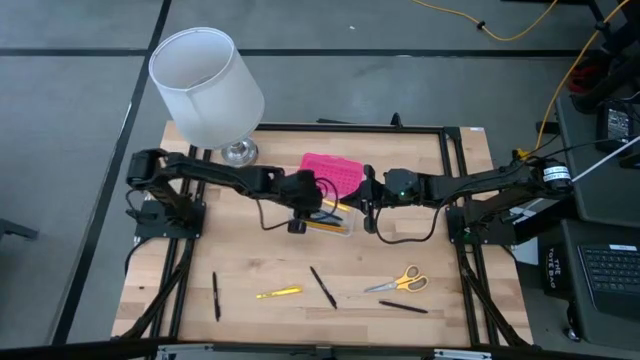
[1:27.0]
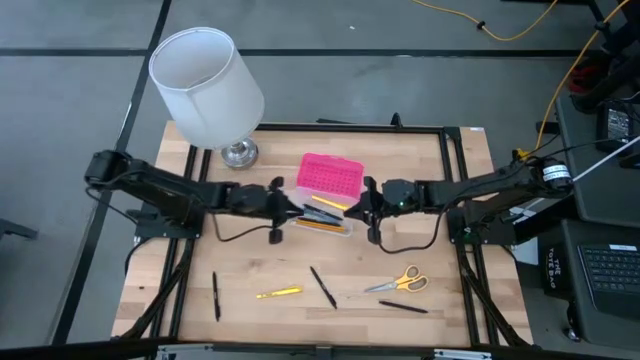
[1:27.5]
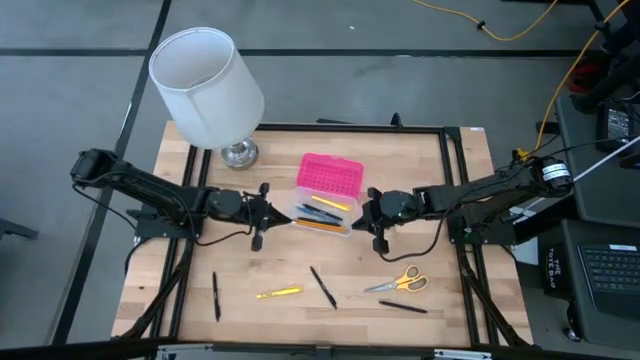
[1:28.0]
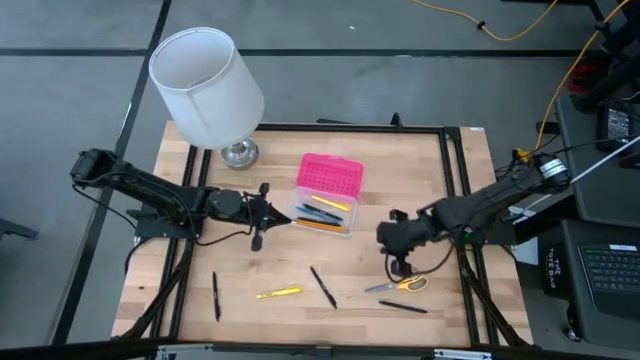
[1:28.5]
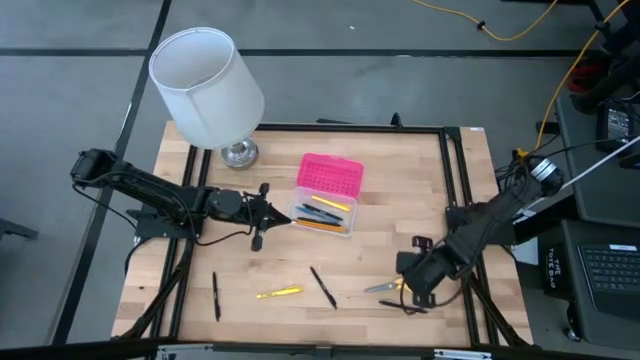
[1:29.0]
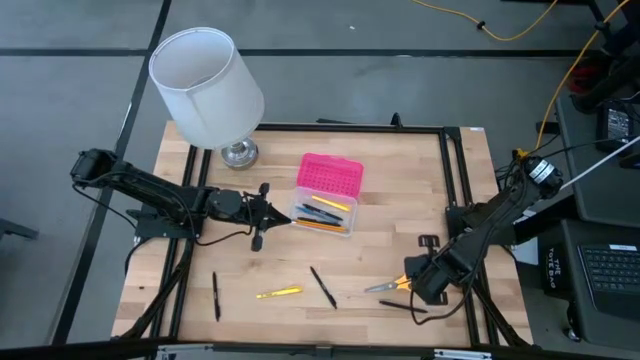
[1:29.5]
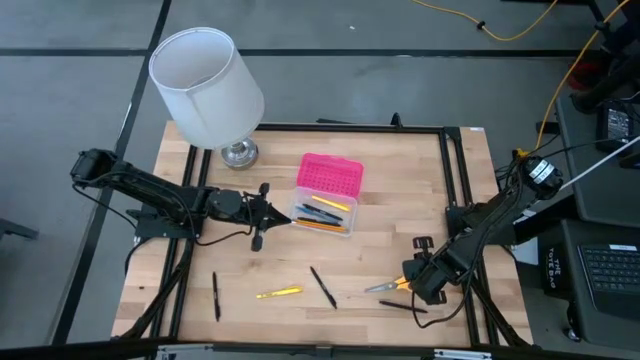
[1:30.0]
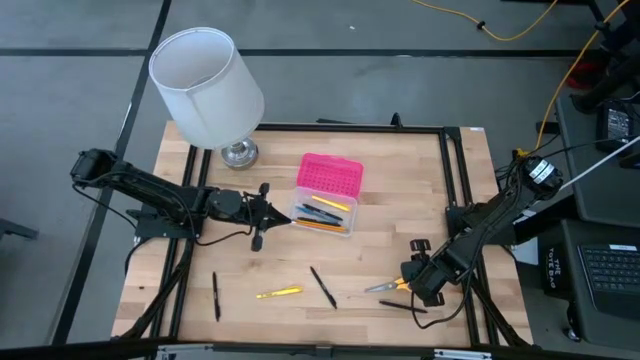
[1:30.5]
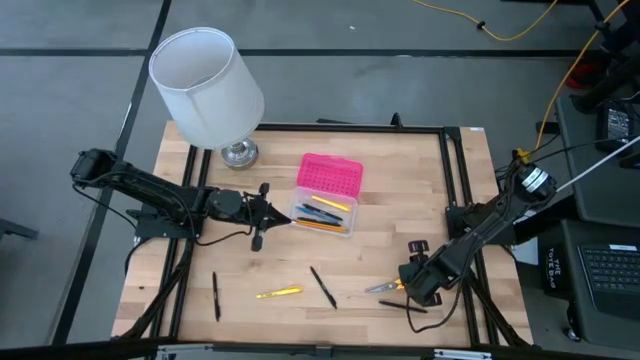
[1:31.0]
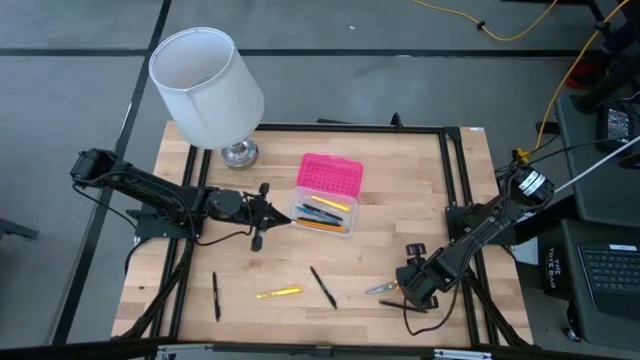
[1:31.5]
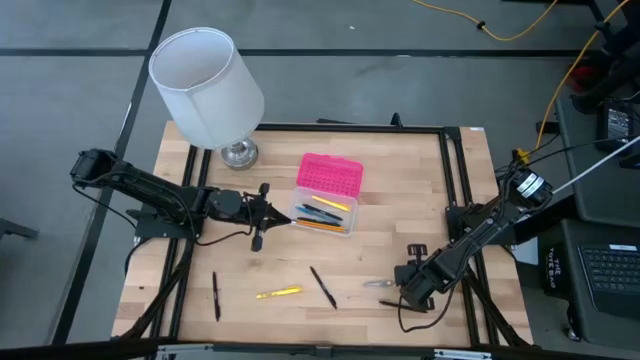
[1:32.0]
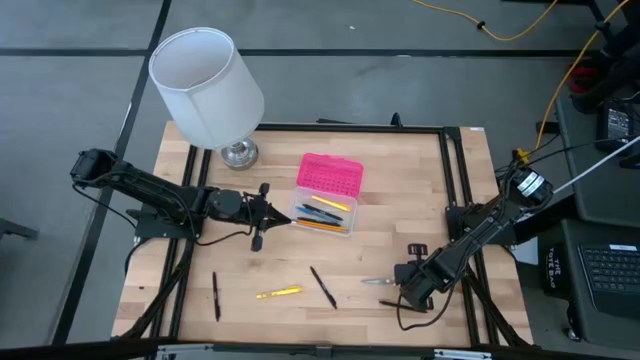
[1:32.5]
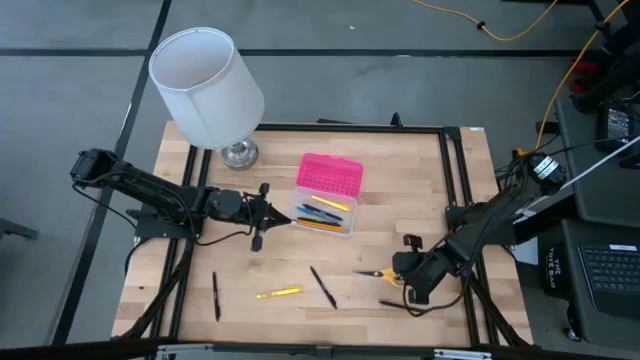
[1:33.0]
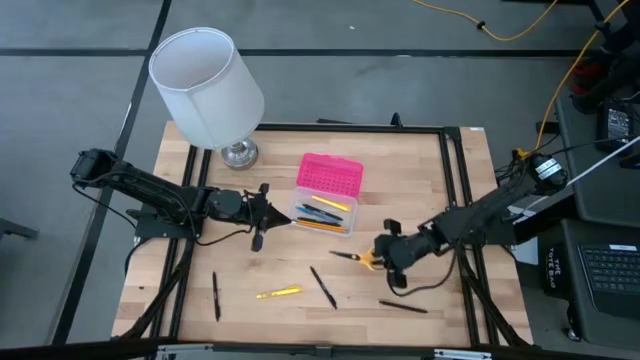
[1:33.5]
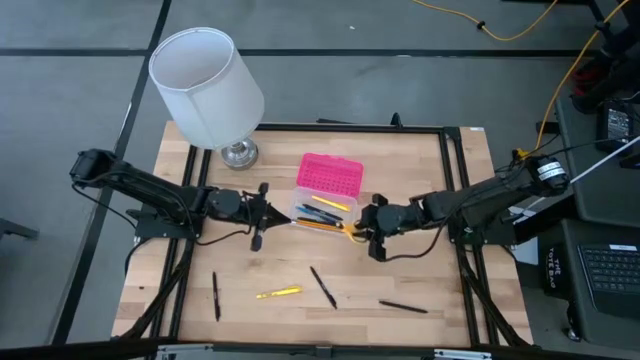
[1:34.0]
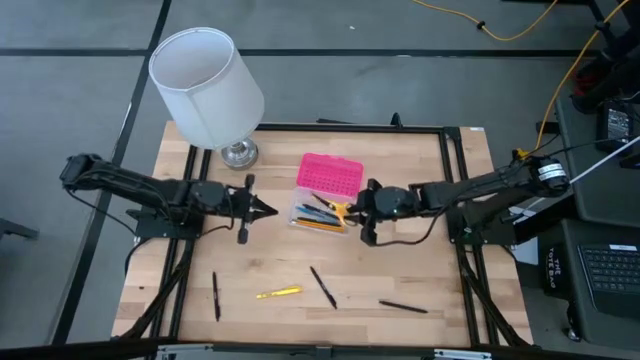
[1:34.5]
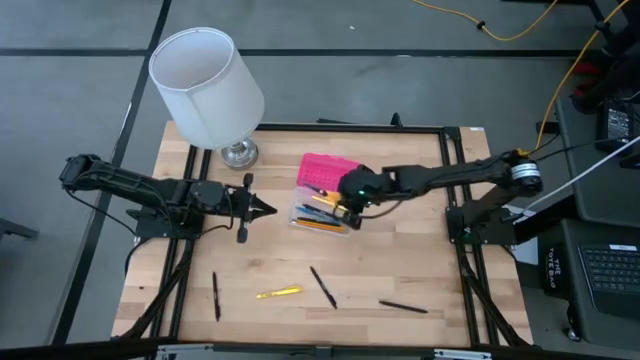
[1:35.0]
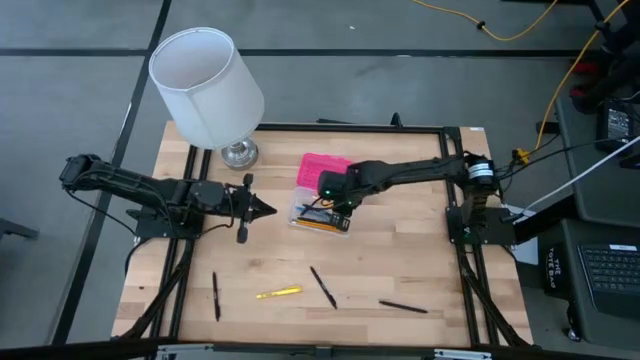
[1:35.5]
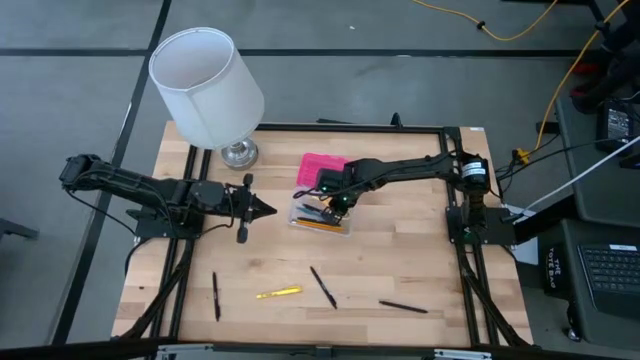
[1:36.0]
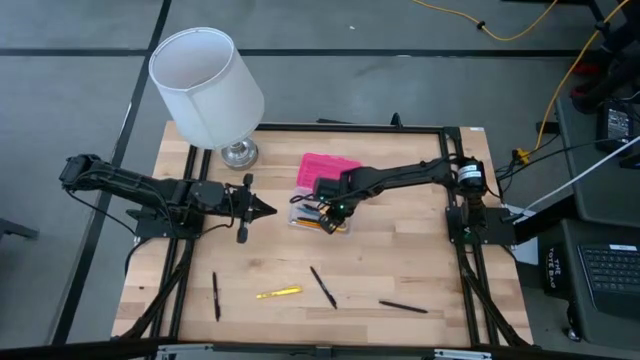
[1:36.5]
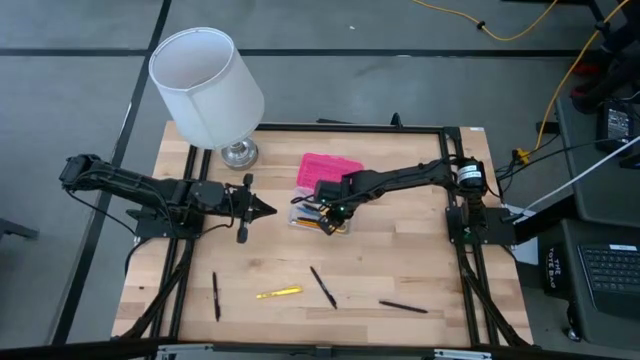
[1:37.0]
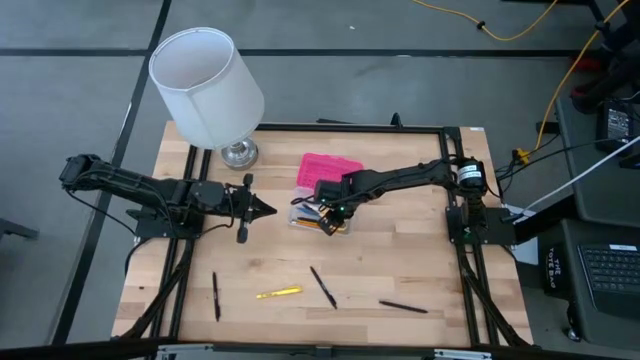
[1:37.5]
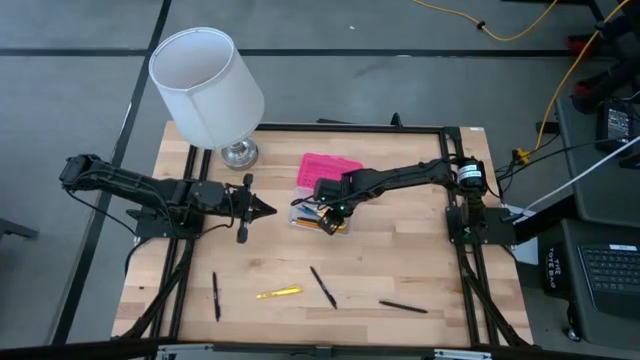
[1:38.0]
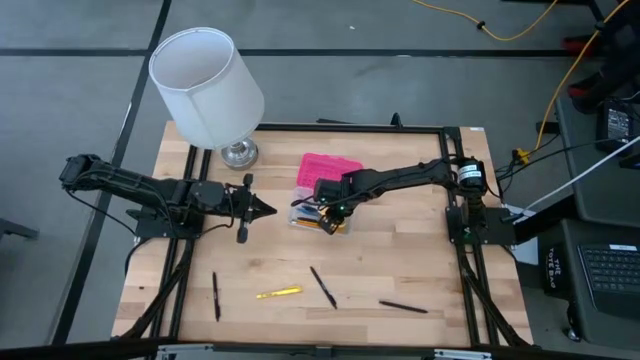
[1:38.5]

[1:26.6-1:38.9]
Task: Pick & place school supplies into a supply box
Put the yellow scissors into the transparent supply box

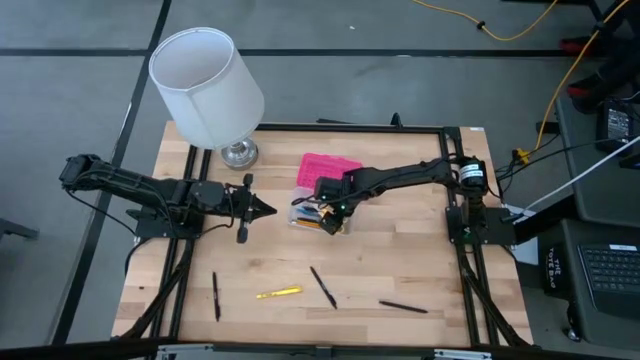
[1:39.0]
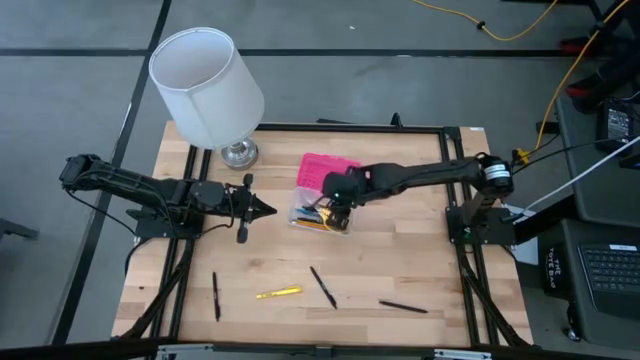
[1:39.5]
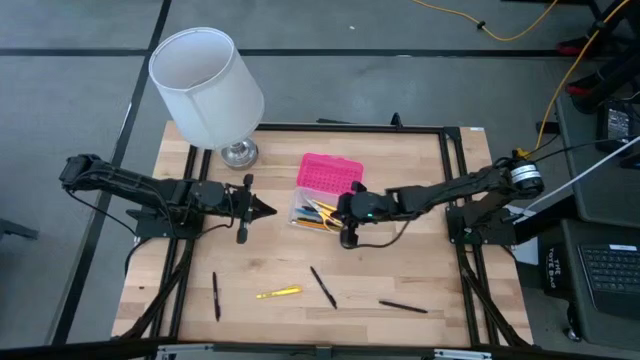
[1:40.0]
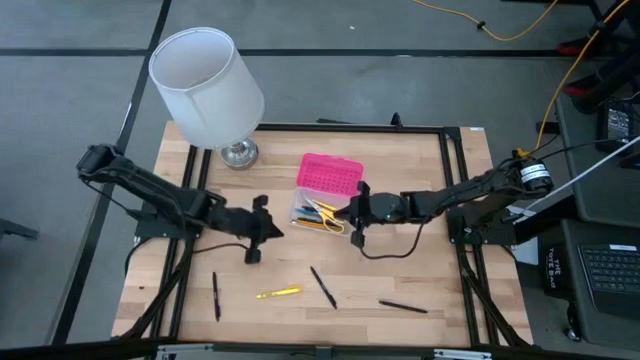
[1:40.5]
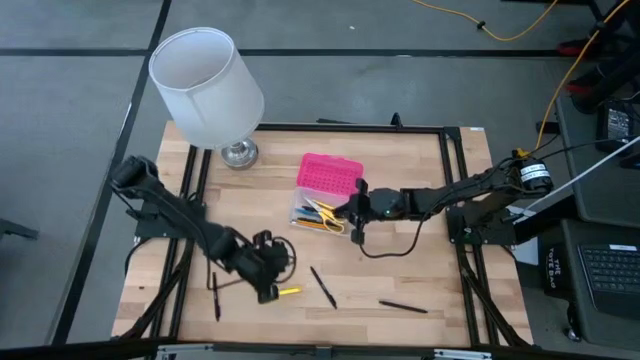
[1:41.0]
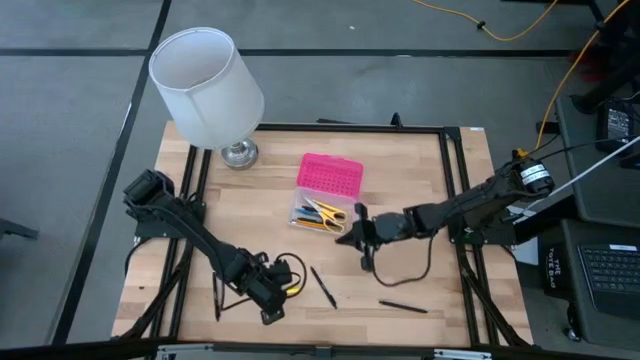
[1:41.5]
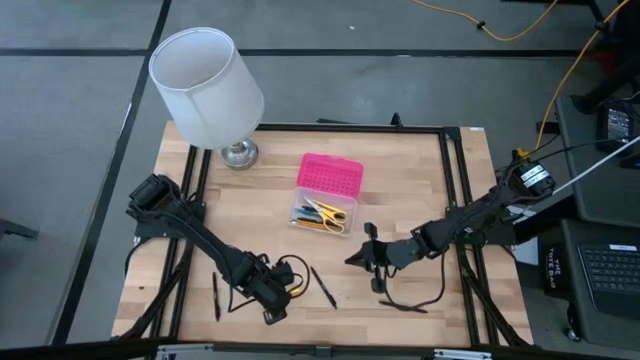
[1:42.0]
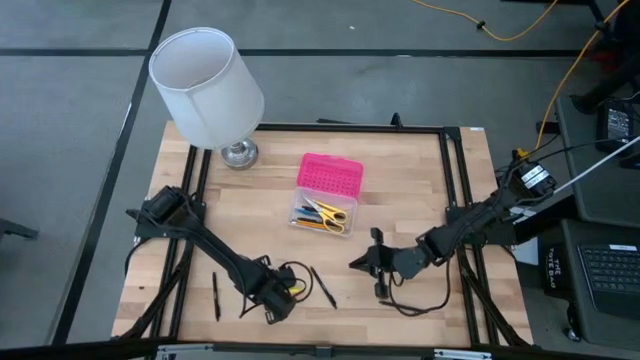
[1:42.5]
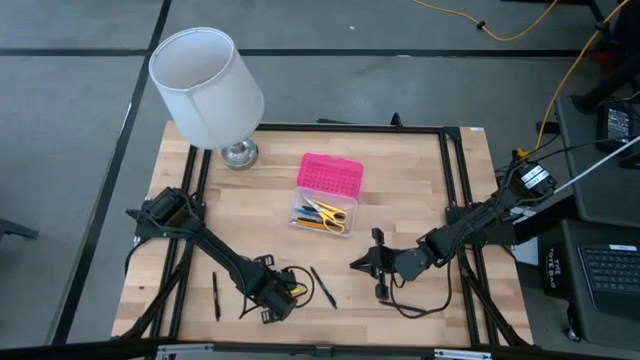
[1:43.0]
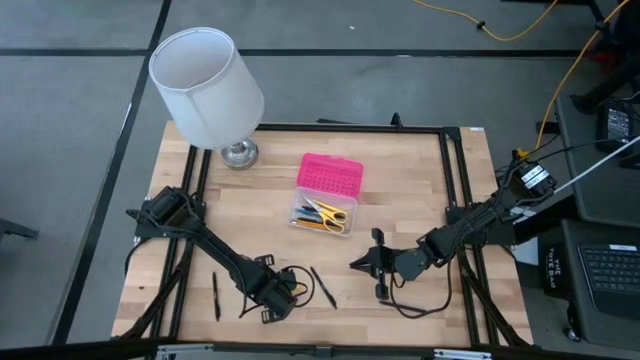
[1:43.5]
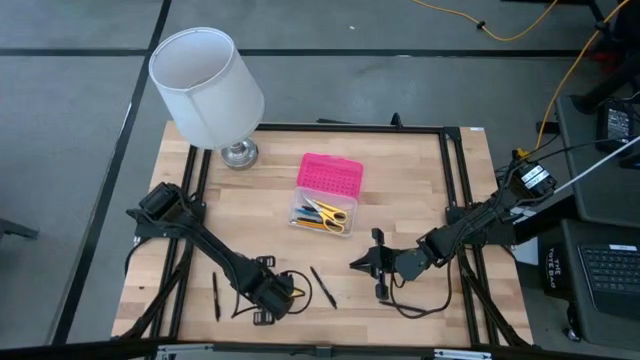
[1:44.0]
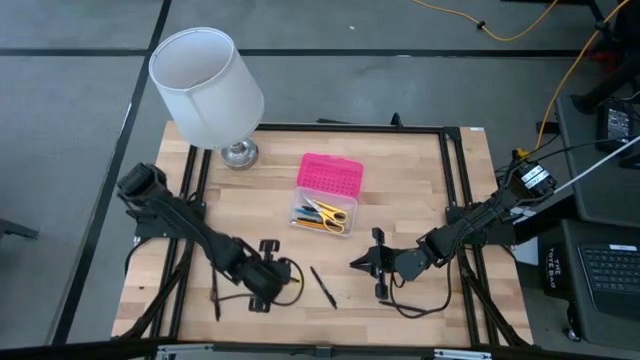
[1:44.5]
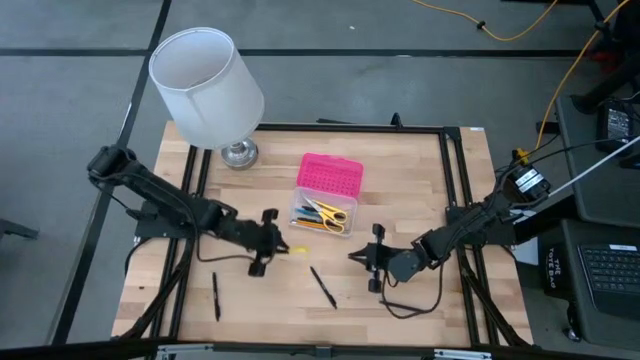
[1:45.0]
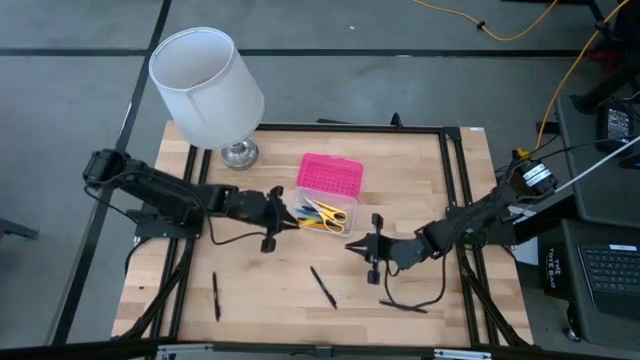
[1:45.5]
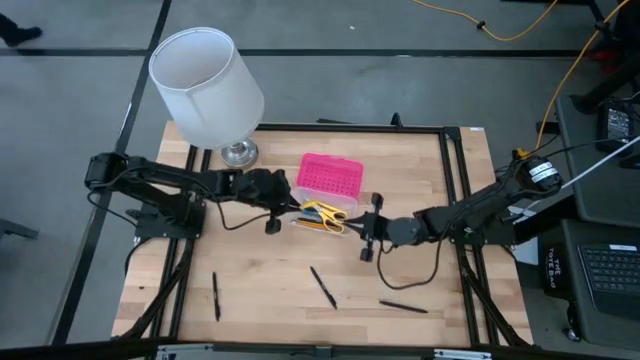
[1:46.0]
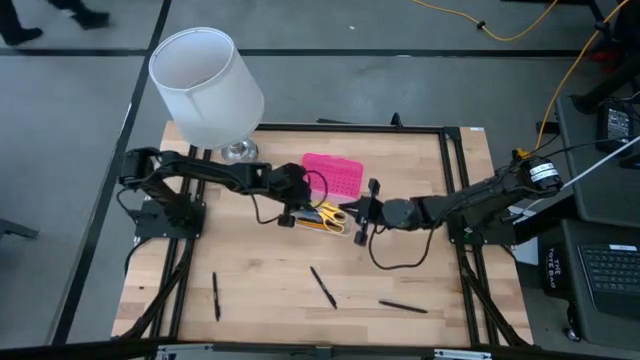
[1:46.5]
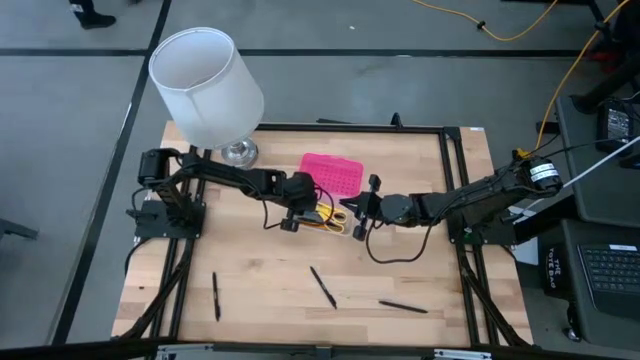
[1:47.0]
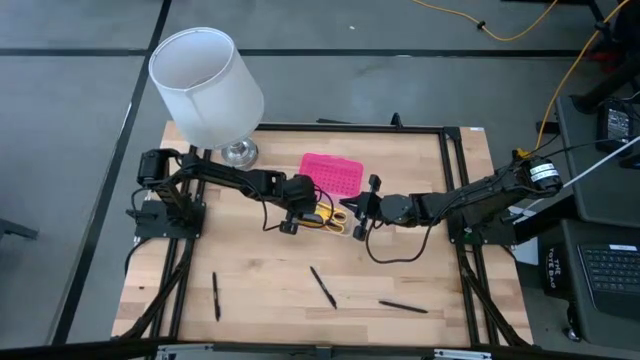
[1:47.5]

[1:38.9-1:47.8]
Put the yellow pen into the transparent supply box
